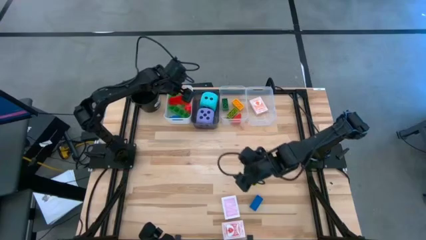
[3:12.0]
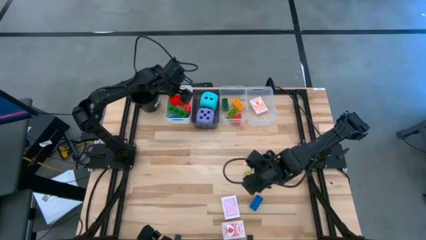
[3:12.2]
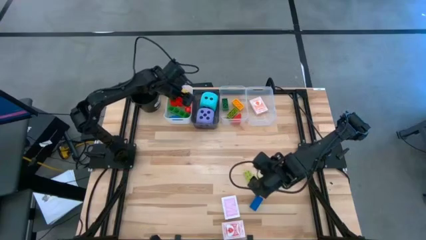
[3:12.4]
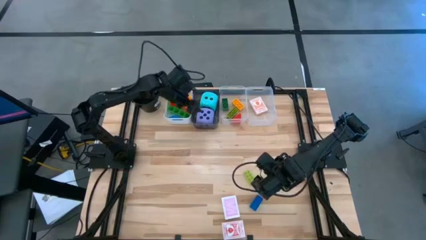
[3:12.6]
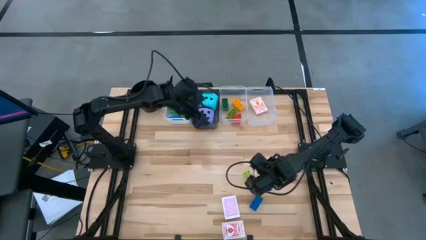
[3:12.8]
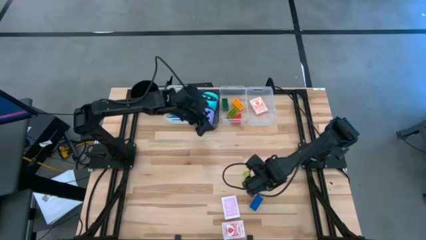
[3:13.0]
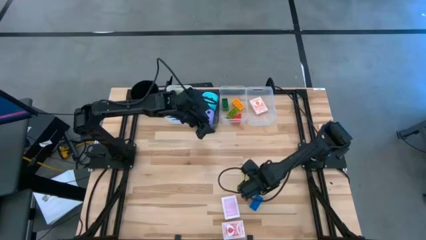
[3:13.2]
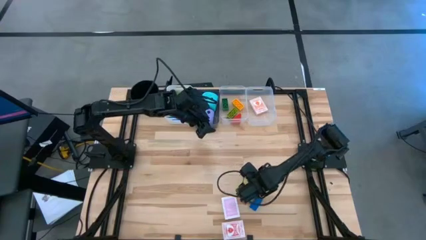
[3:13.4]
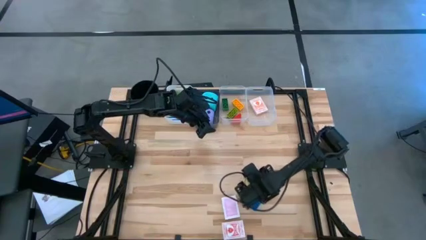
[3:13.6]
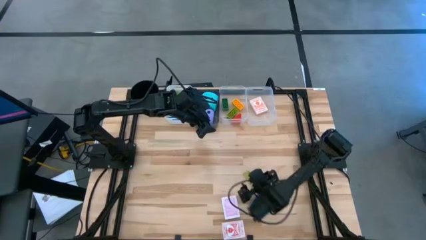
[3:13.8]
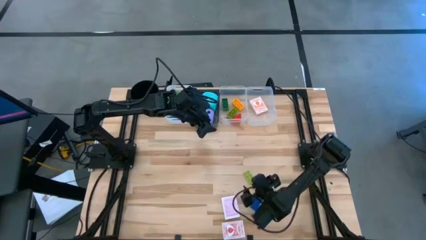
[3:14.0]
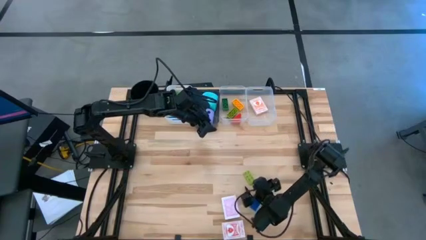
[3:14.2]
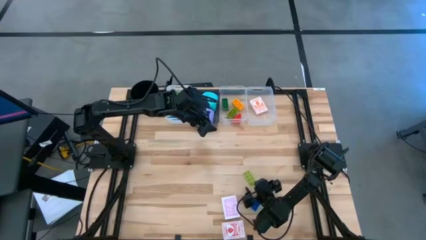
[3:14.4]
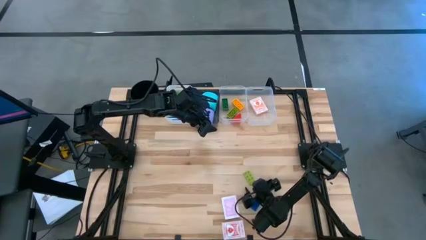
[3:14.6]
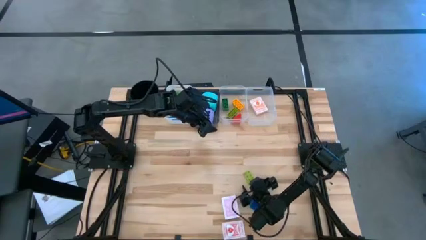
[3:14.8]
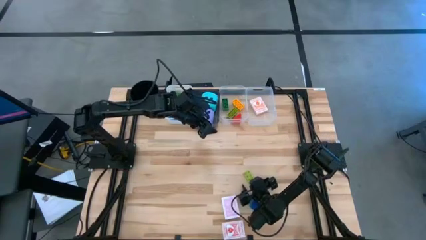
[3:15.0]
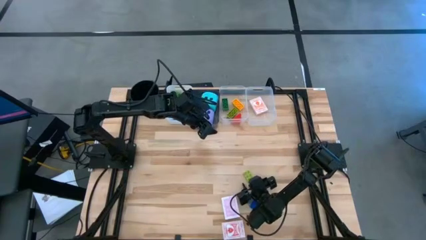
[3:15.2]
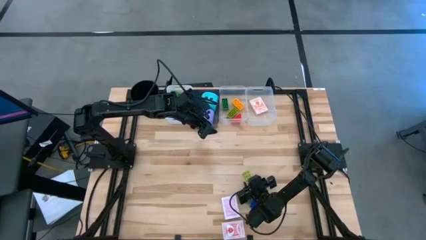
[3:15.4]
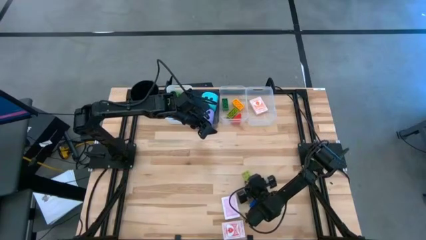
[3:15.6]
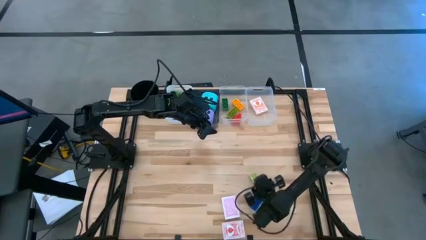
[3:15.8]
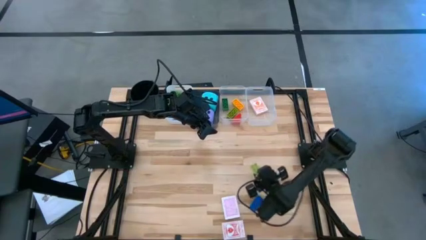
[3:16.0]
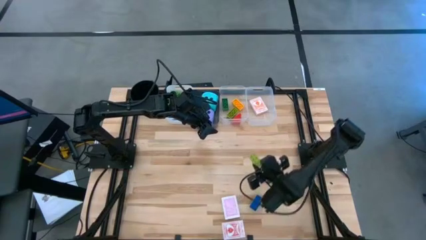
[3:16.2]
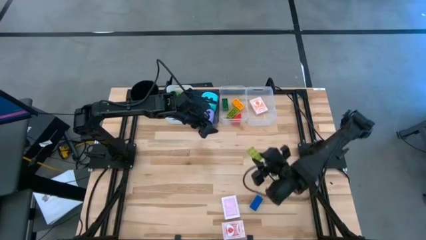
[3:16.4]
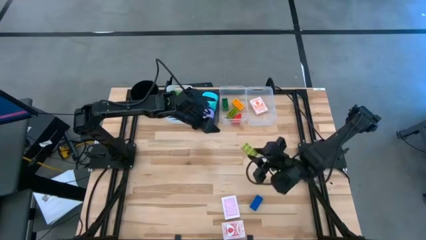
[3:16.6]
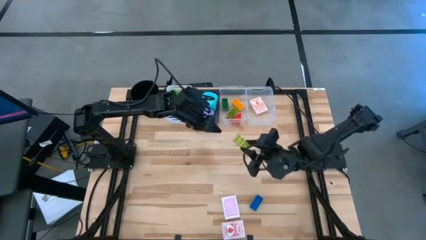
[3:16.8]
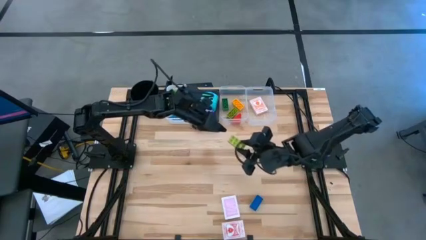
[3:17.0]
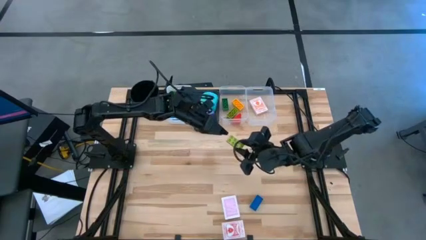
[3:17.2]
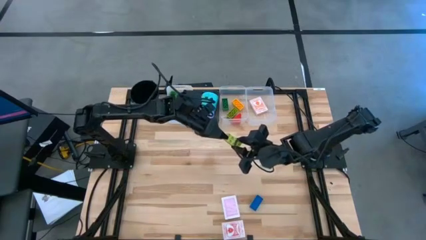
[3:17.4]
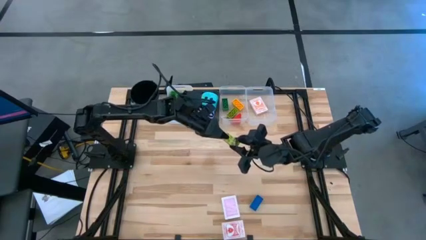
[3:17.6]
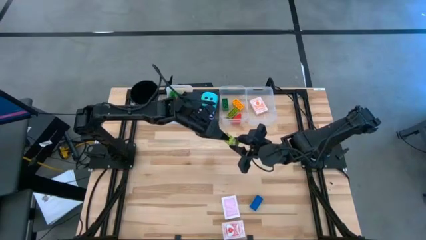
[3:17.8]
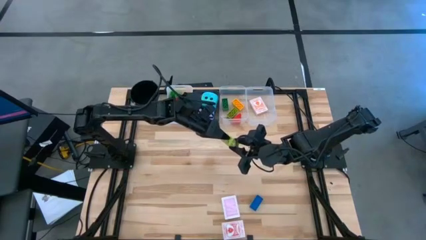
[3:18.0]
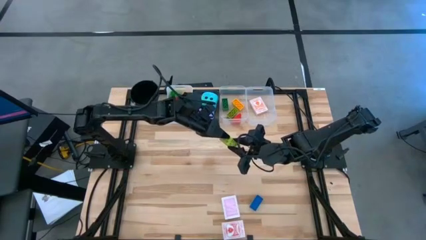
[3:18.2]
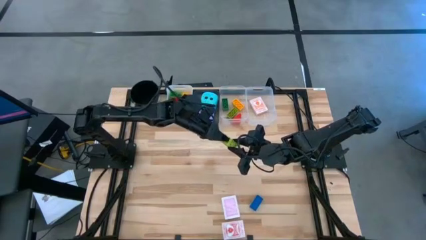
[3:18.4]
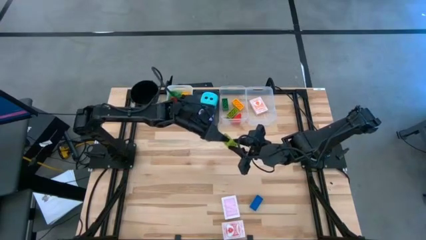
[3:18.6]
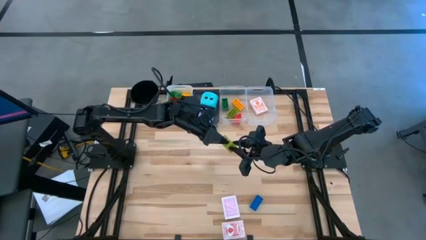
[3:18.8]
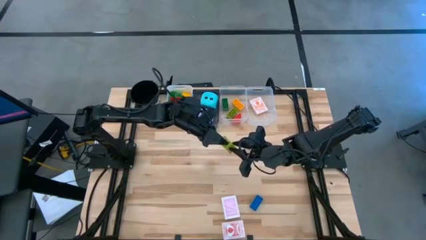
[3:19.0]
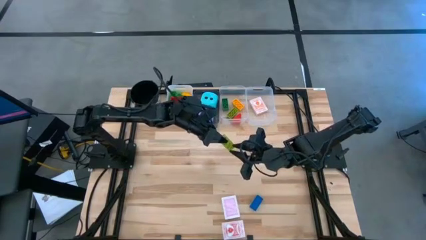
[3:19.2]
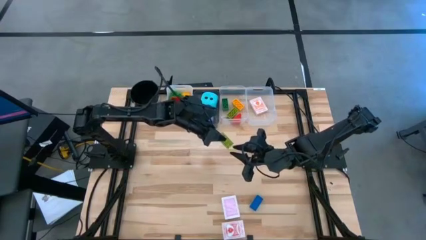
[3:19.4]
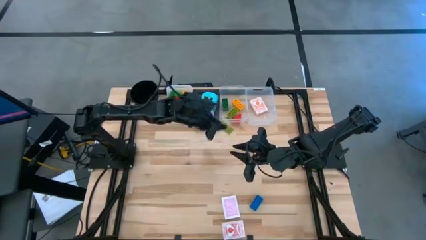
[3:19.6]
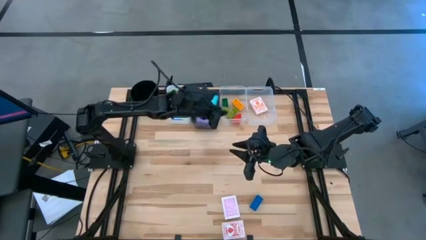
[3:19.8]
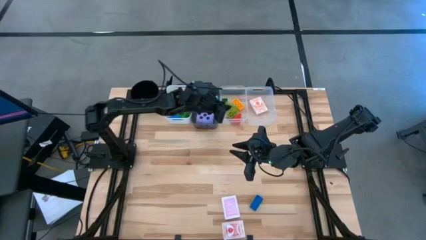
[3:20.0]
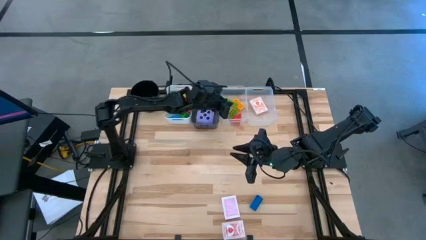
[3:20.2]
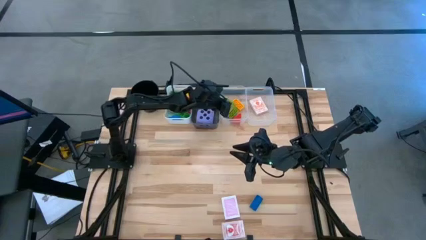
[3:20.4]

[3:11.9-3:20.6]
Task: Pick & Place Toys
Put the small light green 8-stud game piece into the left transparent bin

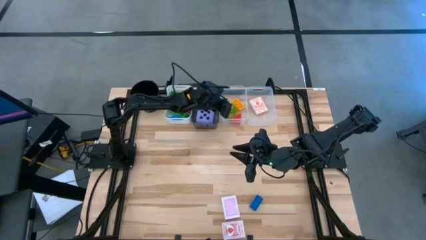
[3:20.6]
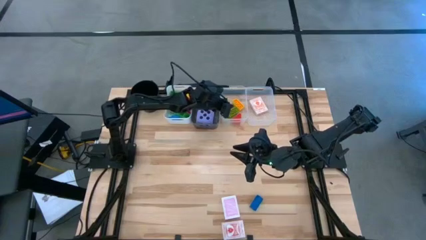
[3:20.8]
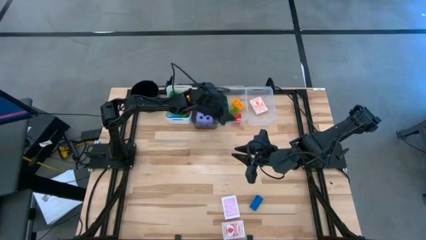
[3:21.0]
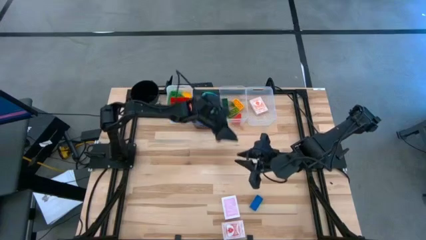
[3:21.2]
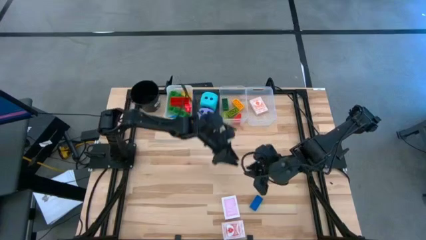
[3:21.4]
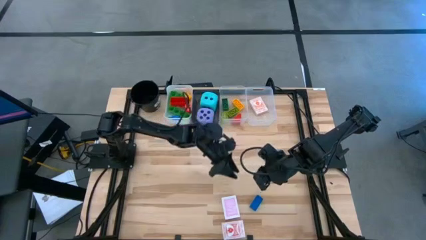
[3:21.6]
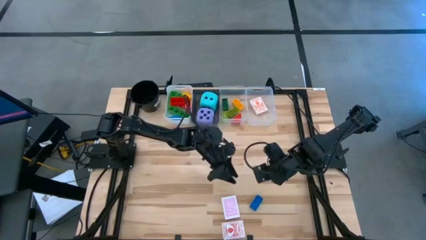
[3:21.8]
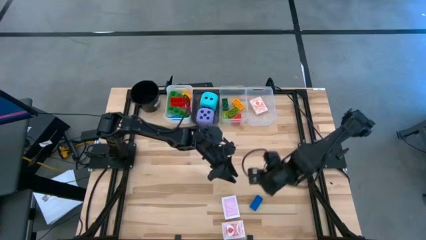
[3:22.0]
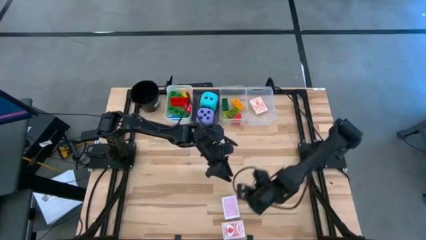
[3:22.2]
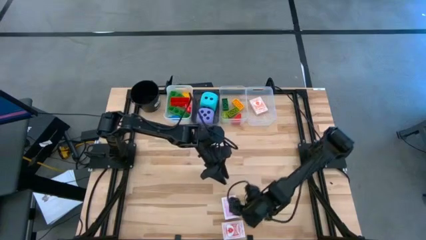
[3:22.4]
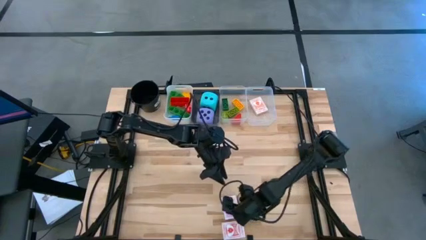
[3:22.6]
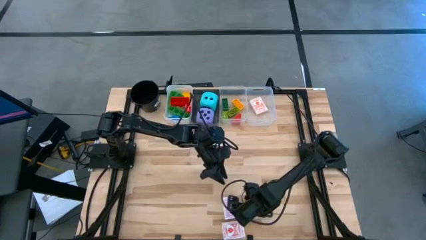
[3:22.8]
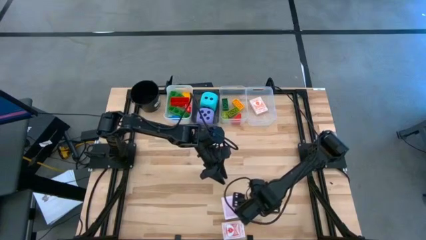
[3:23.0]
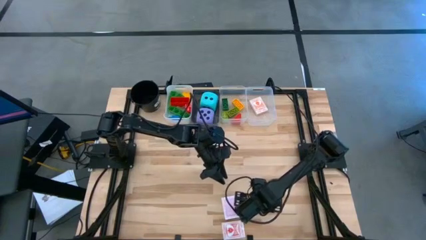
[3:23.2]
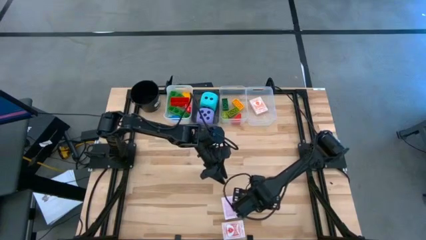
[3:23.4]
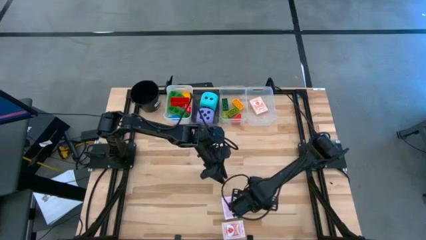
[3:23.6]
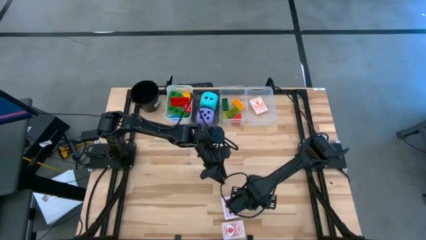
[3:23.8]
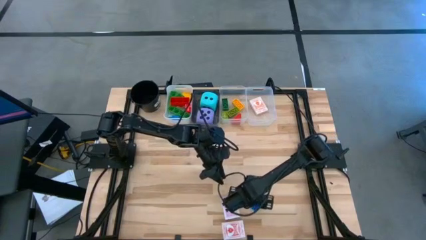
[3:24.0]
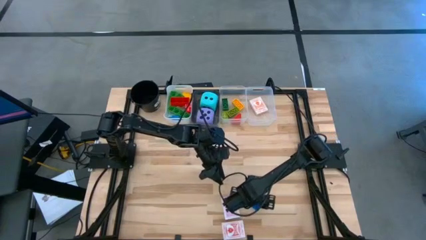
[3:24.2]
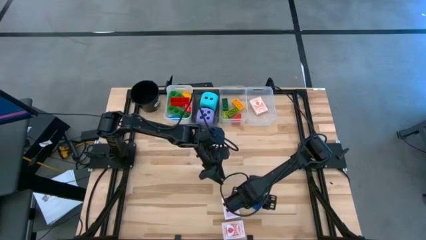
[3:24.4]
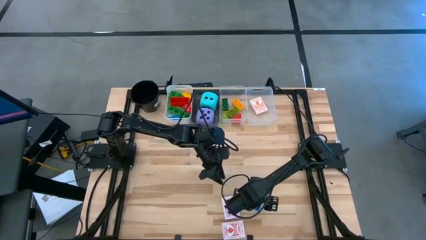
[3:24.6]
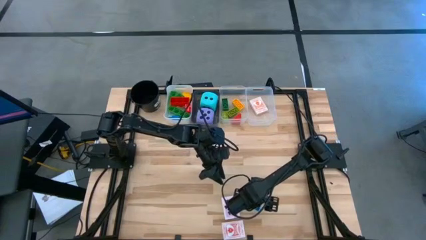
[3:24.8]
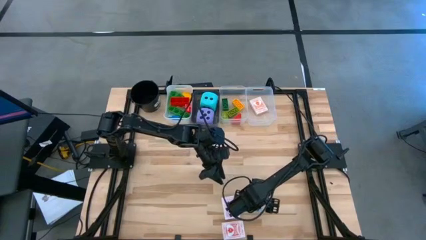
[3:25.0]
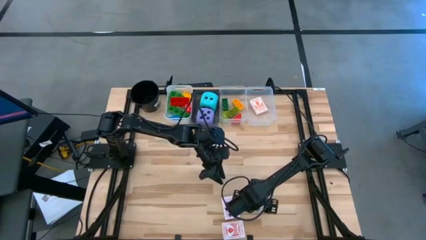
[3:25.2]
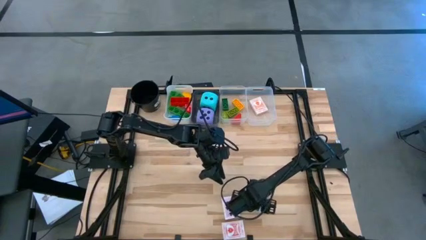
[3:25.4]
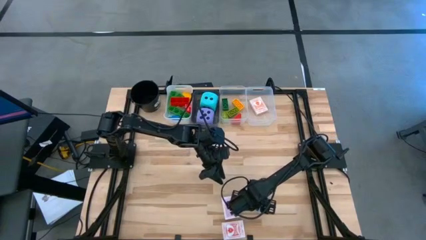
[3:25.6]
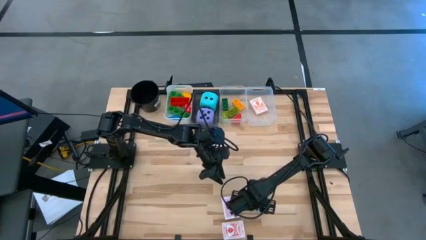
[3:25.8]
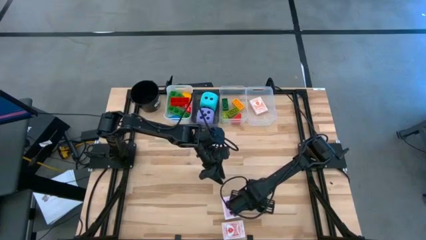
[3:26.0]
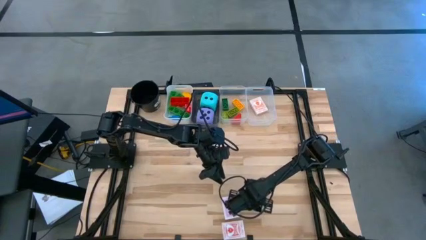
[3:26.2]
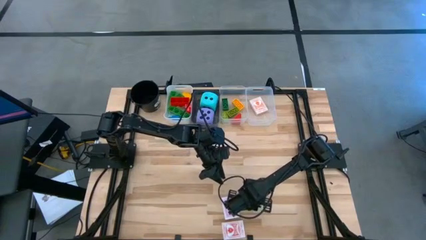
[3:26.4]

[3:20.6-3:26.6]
Put the small blue 8-stud game piece into the left transparent bin
